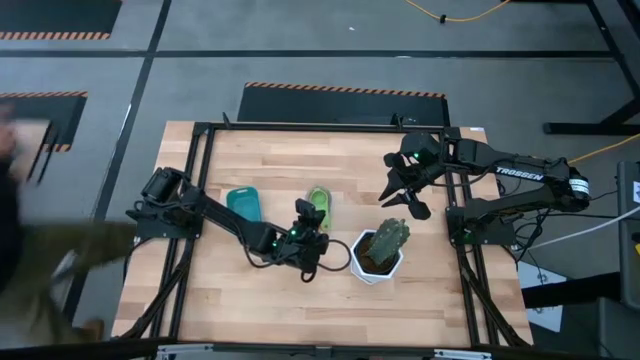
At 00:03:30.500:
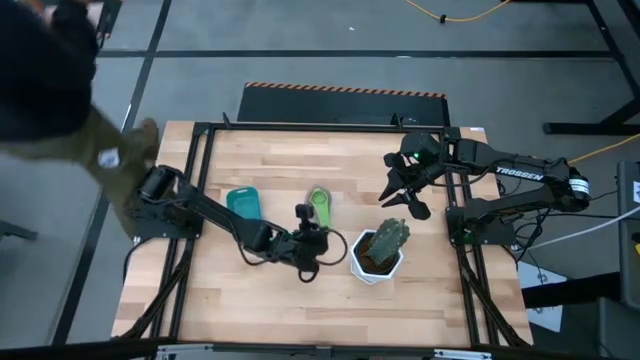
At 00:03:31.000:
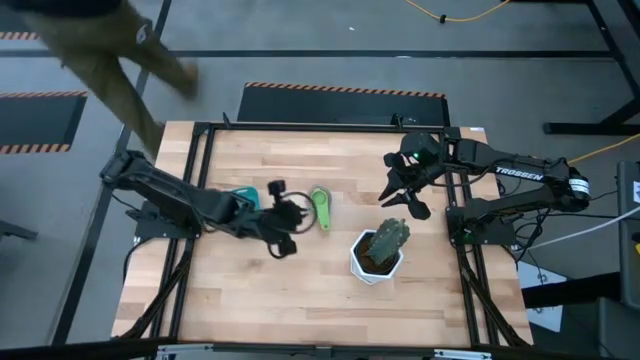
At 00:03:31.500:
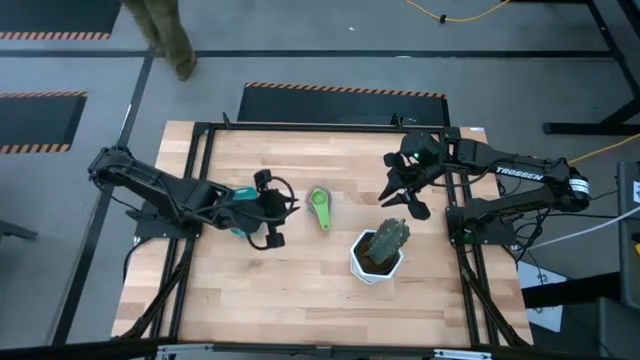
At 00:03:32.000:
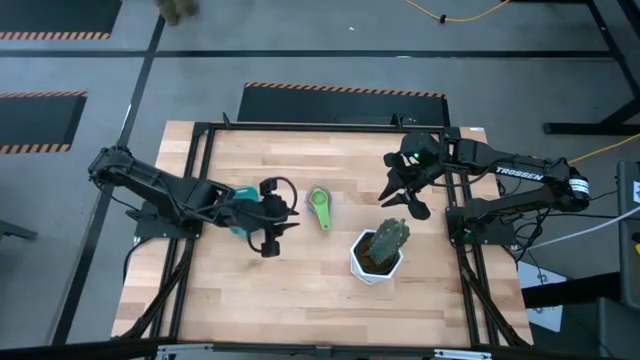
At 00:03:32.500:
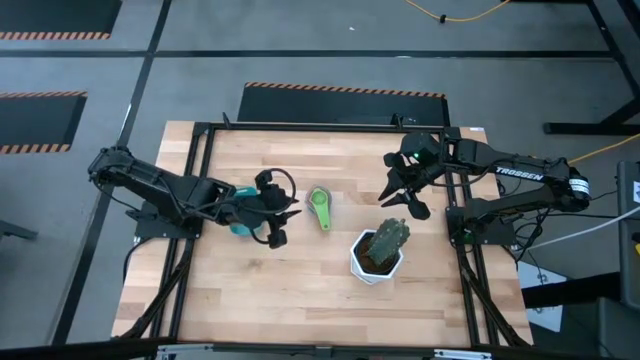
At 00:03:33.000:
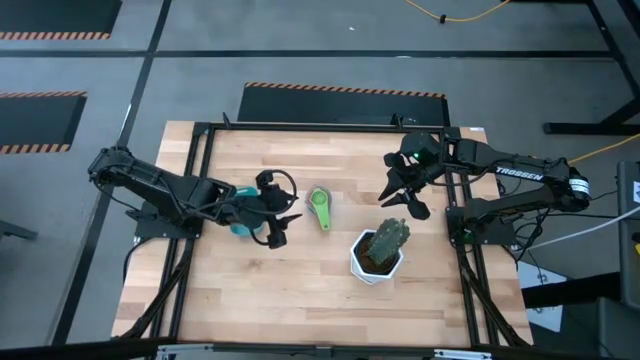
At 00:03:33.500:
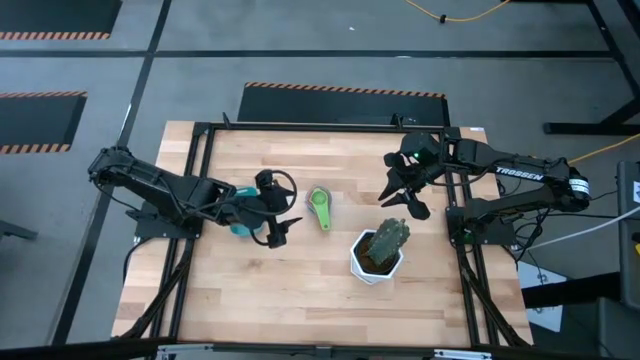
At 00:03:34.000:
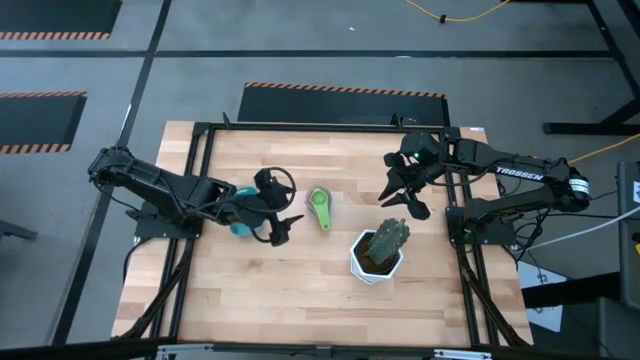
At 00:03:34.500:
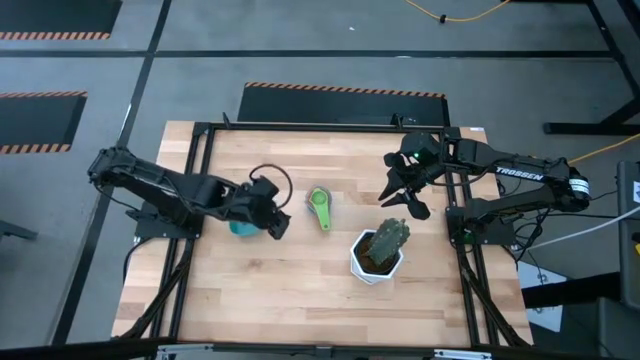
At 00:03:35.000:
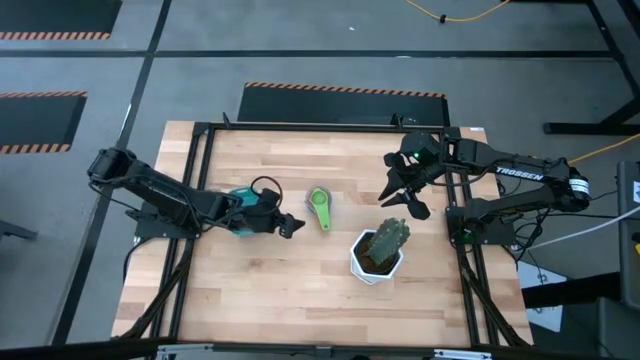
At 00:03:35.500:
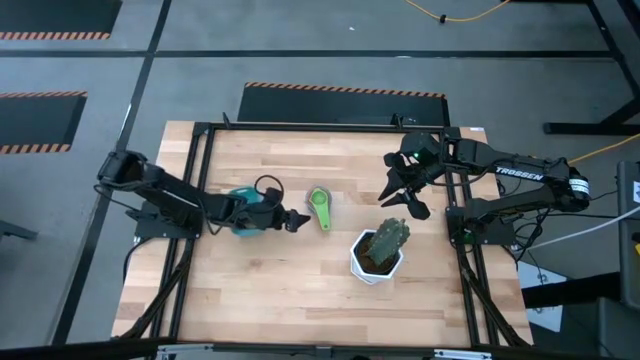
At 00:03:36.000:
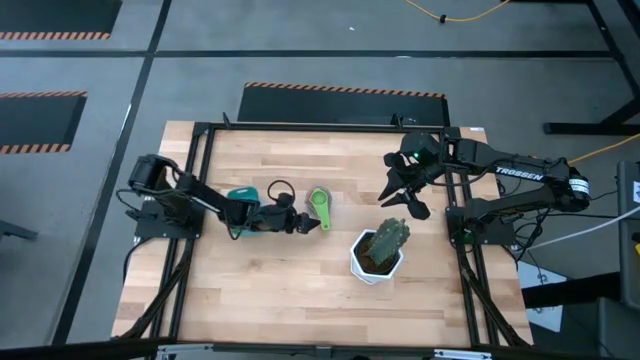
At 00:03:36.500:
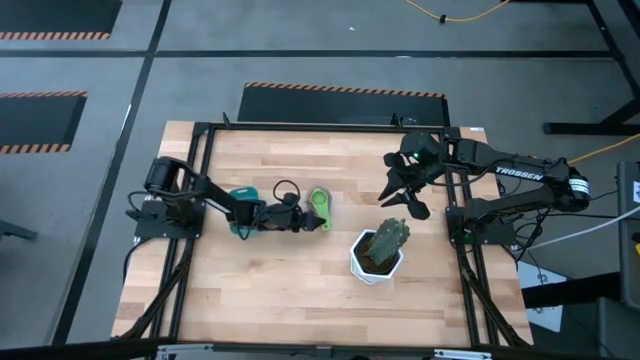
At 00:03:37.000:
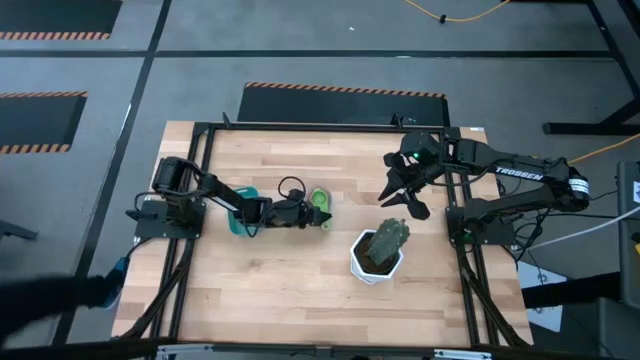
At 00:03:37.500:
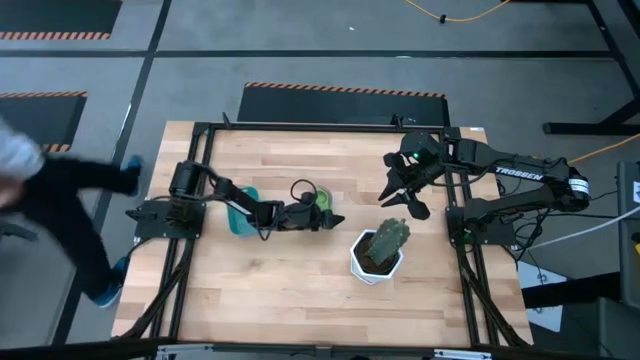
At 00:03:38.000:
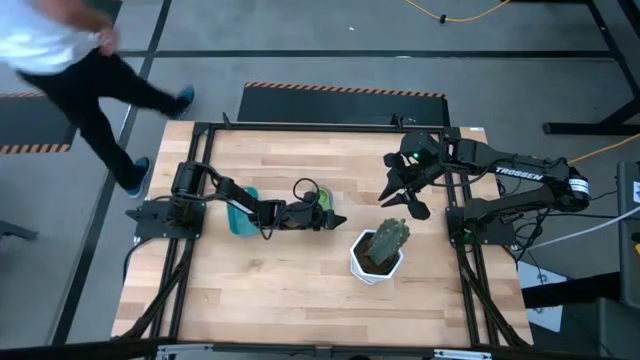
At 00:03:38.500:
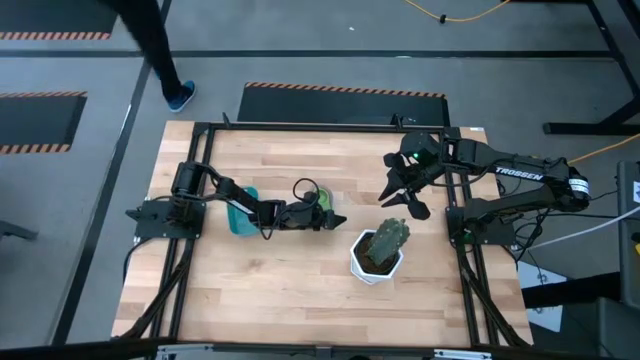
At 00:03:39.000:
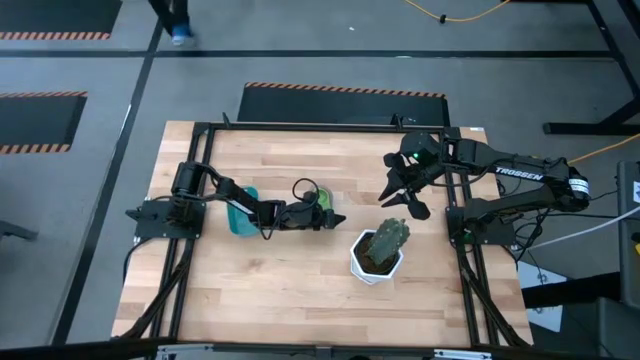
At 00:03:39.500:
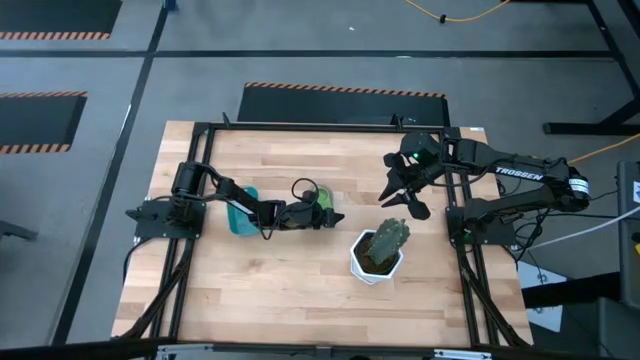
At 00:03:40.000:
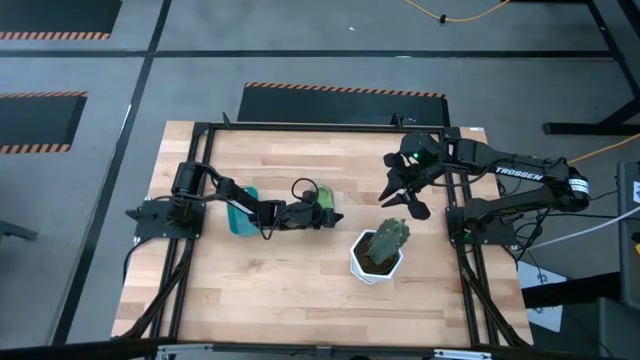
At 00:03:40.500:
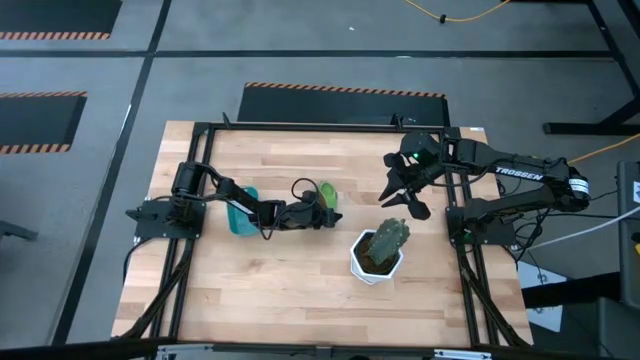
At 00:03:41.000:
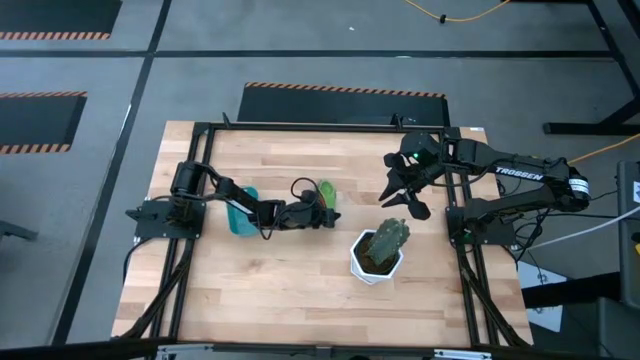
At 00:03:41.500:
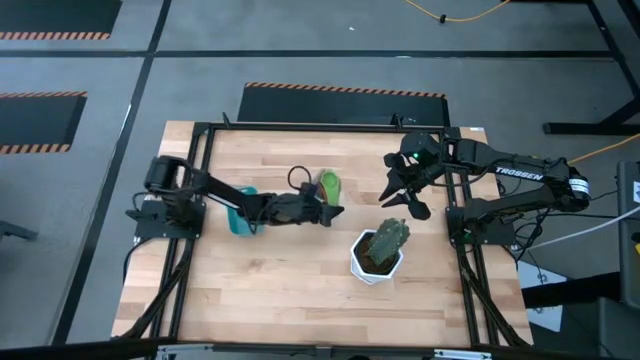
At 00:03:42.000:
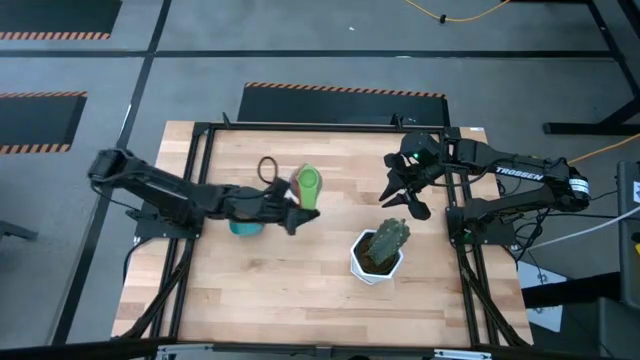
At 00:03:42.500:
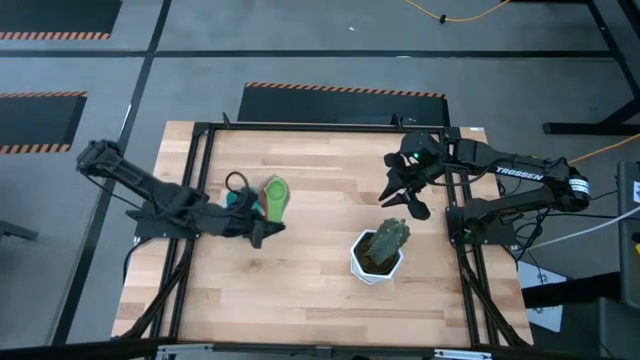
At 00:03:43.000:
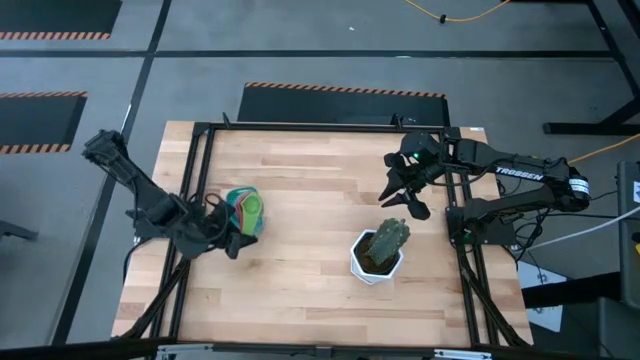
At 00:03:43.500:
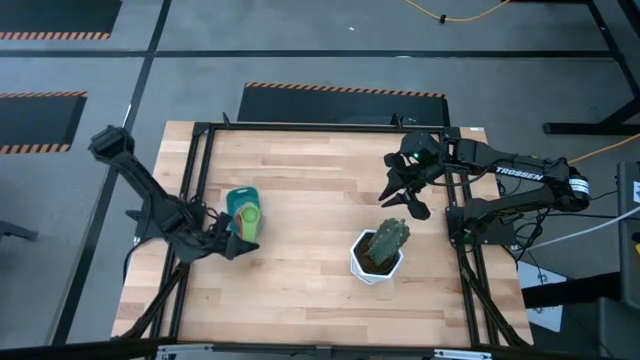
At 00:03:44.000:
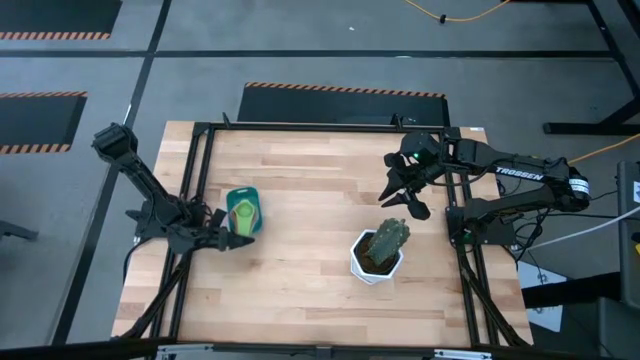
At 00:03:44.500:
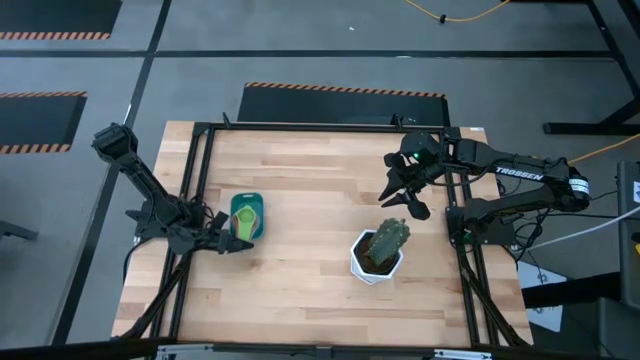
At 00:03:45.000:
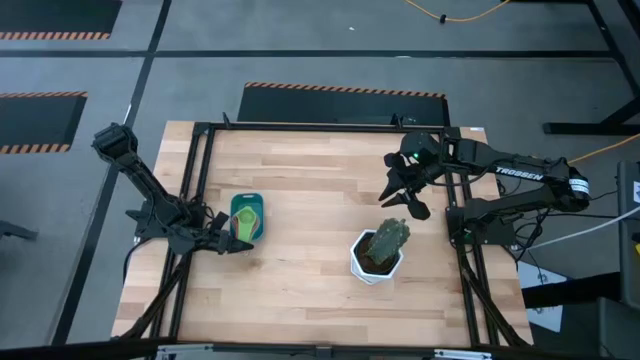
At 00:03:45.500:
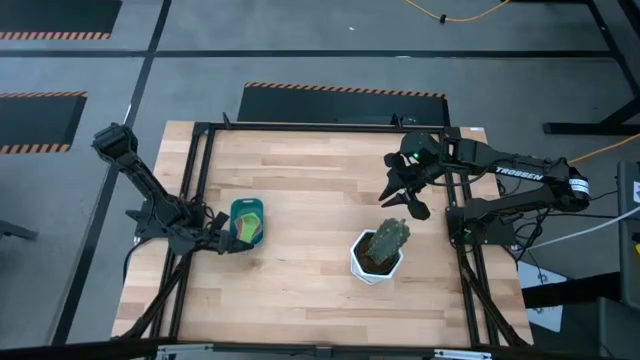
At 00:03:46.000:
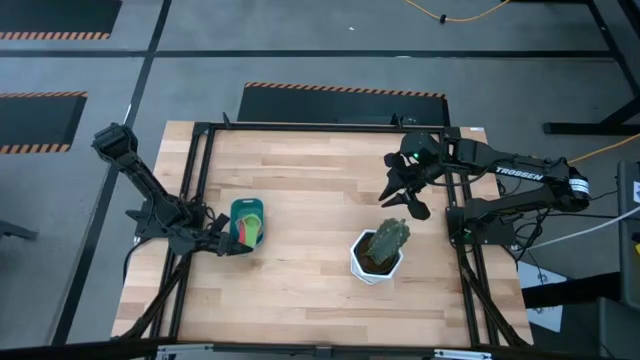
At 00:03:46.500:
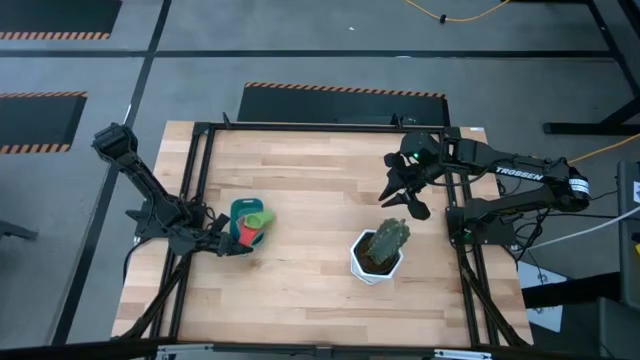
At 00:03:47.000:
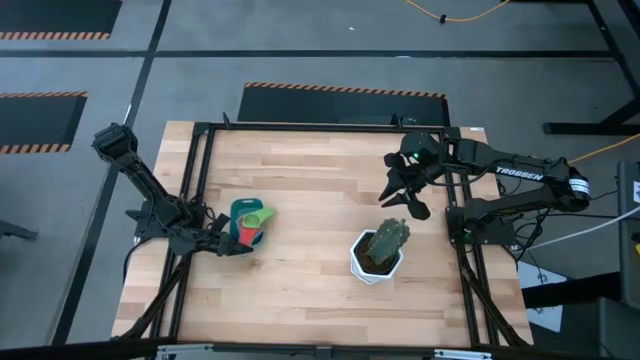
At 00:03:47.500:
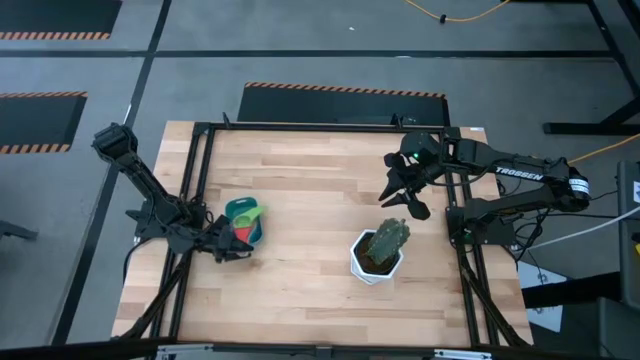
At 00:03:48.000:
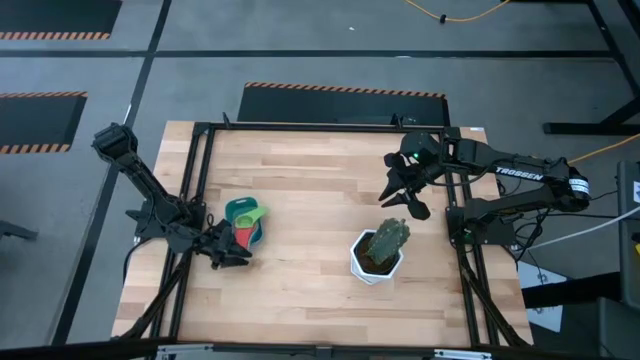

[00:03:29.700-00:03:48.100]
Task: Nest measuring cups in basket
Put the nested measuring cups into the blue bin

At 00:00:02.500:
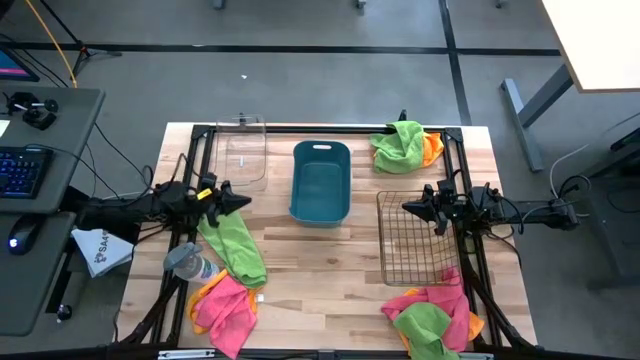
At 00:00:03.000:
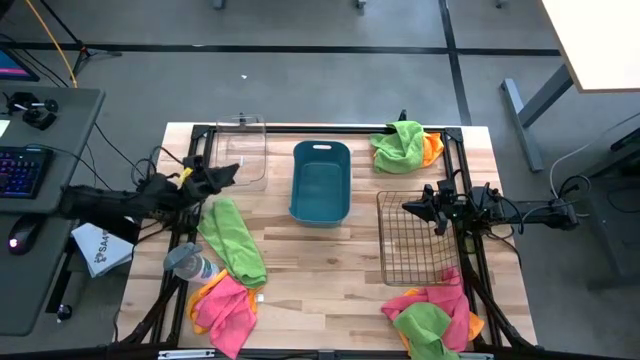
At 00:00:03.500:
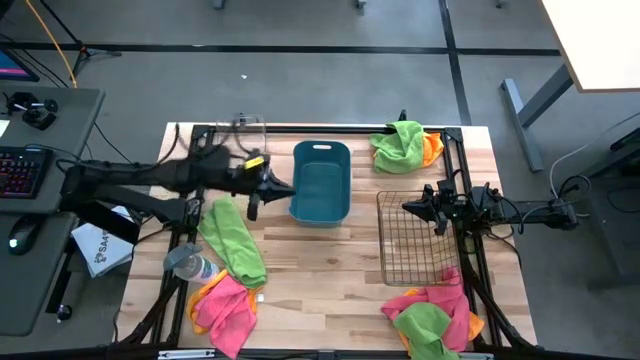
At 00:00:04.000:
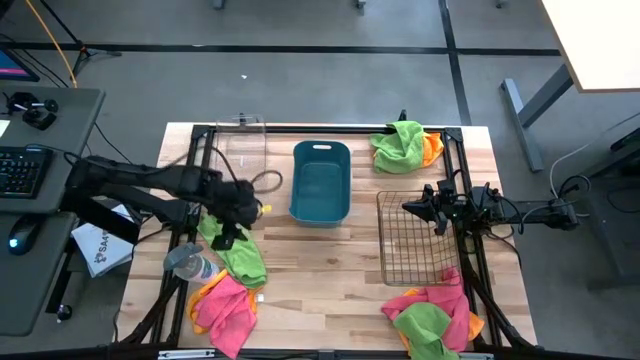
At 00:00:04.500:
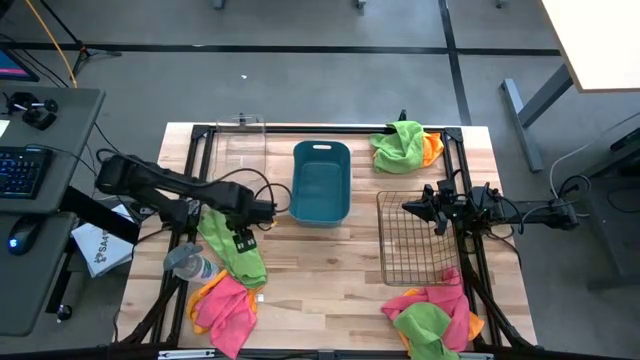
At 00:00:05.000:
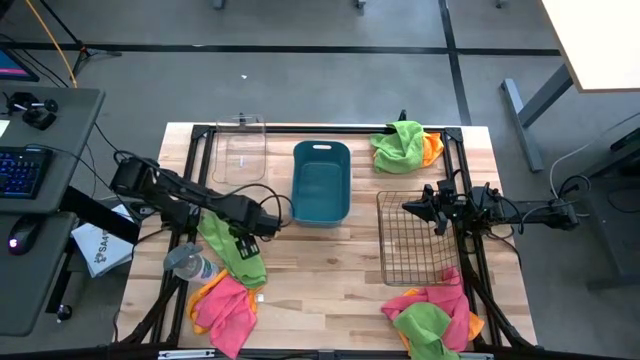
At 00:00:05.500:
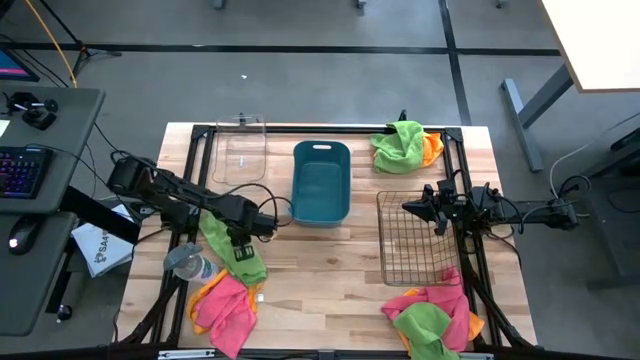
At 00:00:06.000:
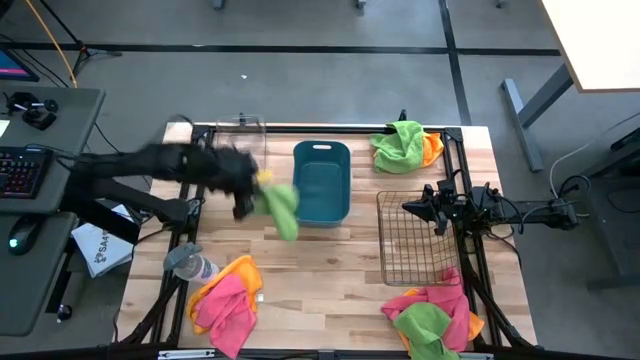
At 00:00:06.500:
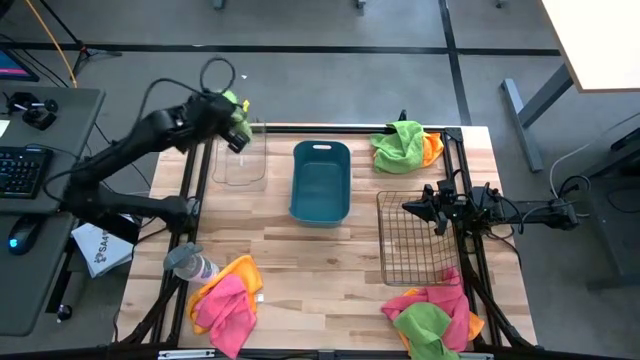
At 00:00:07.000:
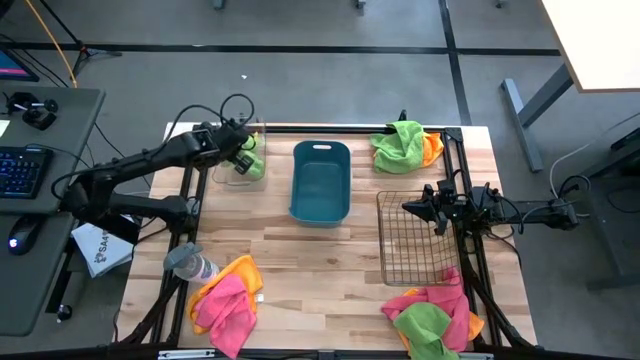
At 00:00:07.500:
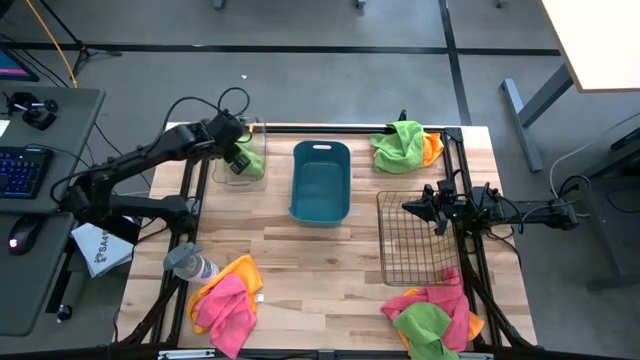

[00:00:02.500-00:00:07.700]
Task: Sort microfiber towel by color & place in baskets
Put the left green towel into the transparent bin
